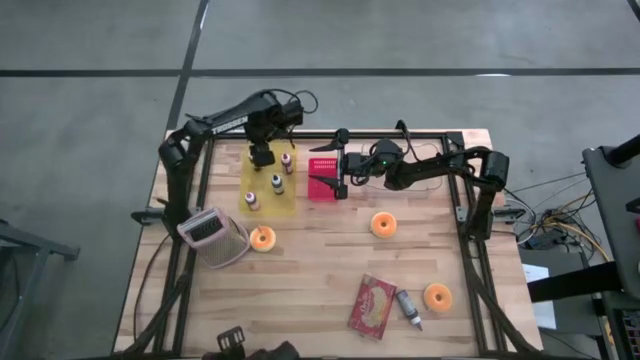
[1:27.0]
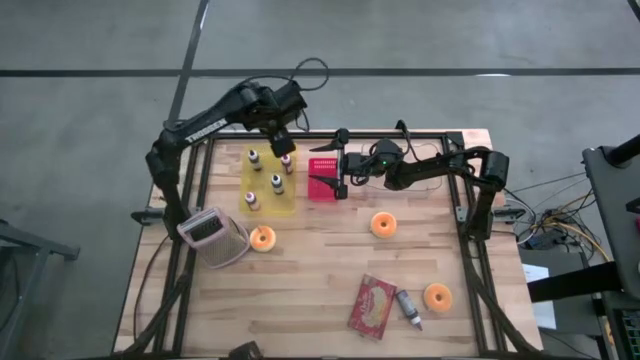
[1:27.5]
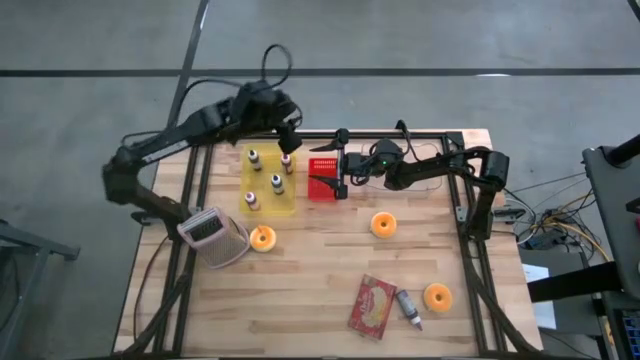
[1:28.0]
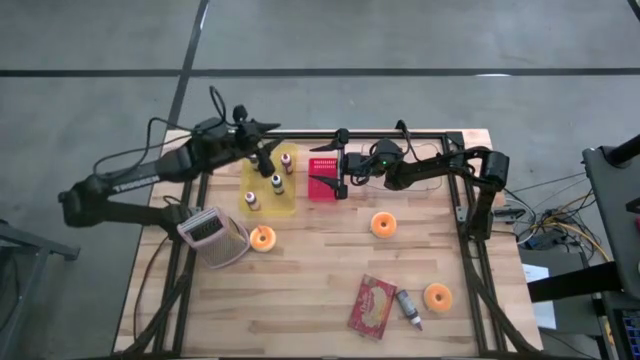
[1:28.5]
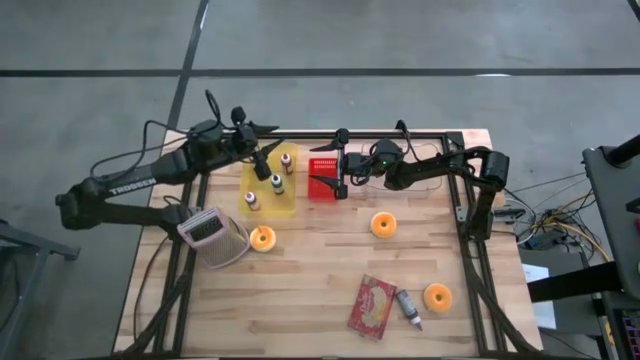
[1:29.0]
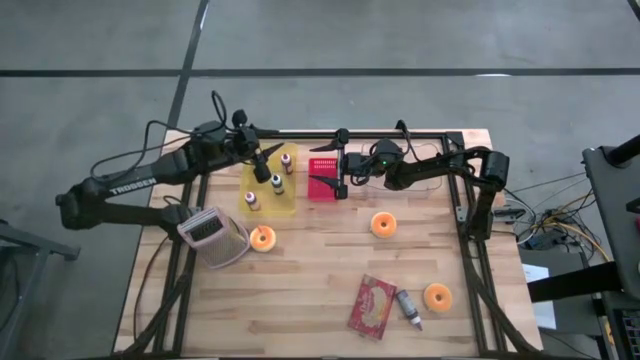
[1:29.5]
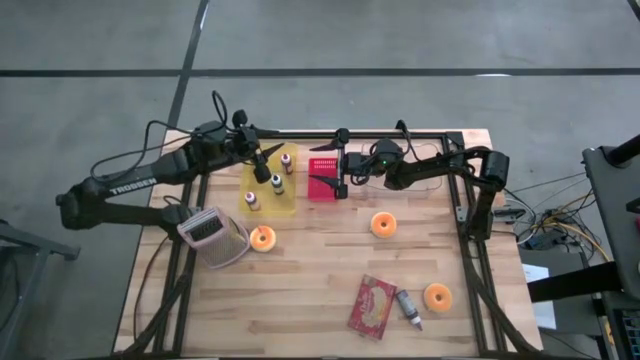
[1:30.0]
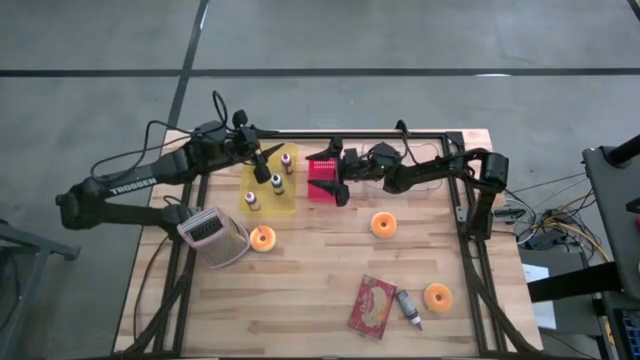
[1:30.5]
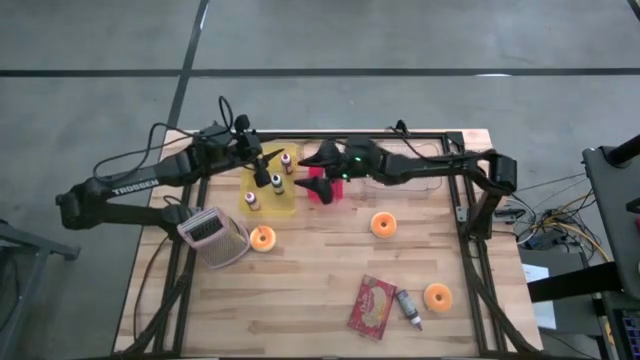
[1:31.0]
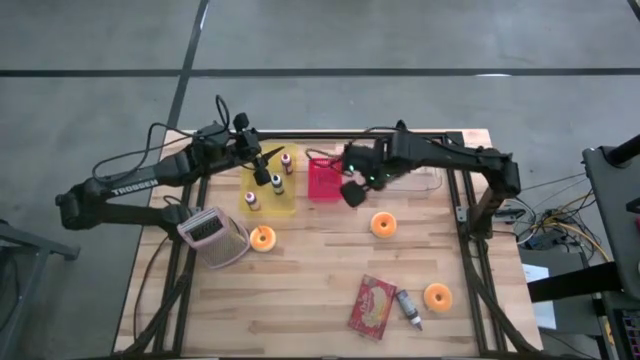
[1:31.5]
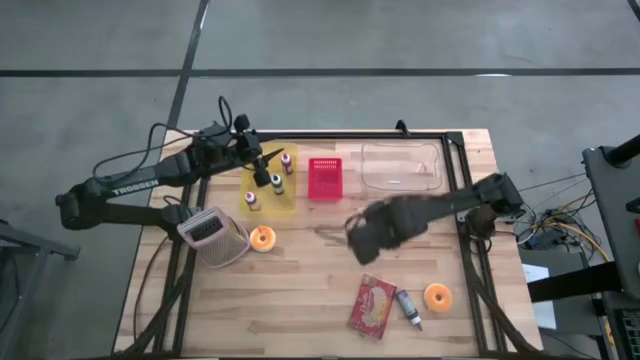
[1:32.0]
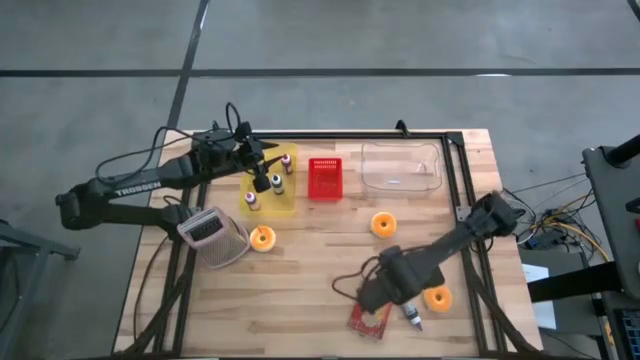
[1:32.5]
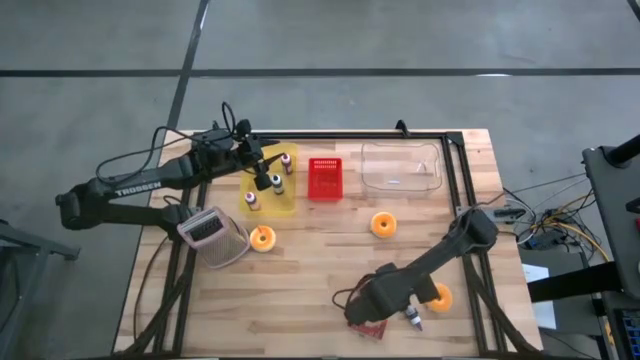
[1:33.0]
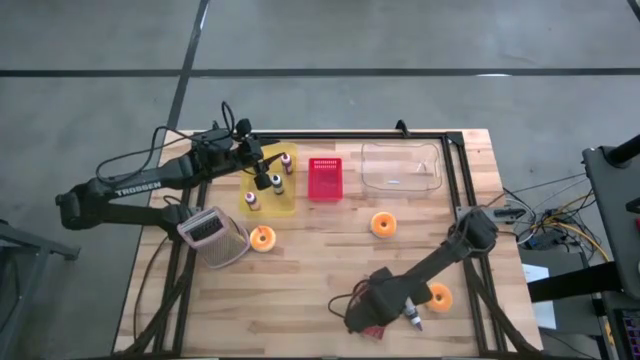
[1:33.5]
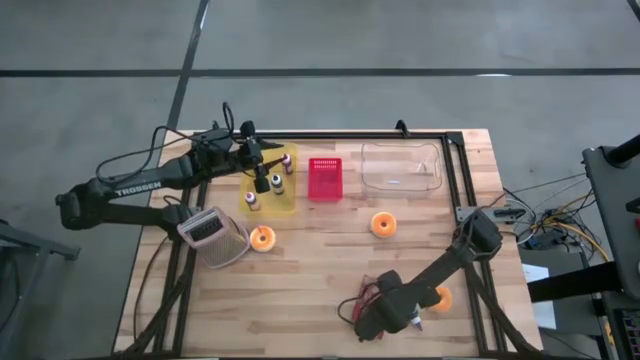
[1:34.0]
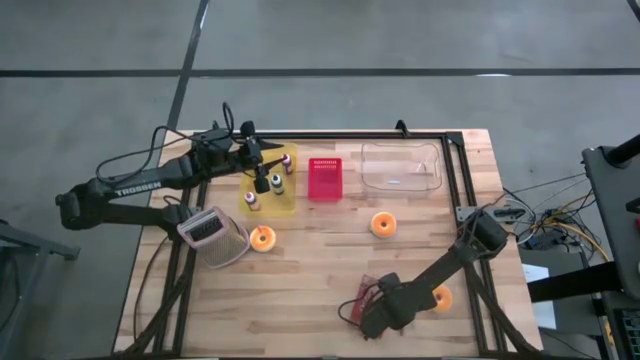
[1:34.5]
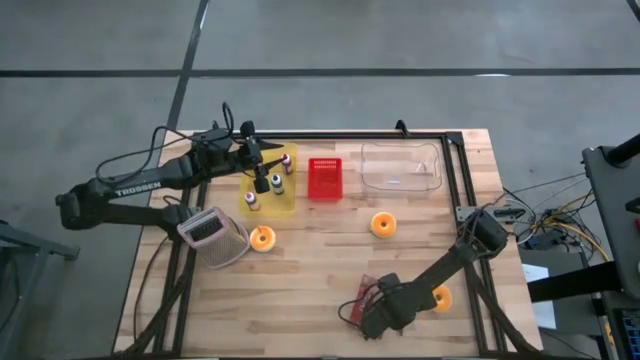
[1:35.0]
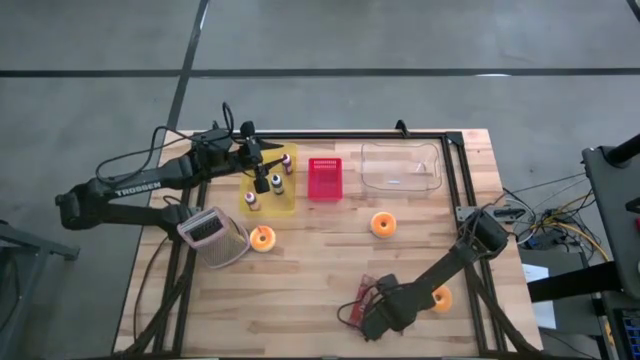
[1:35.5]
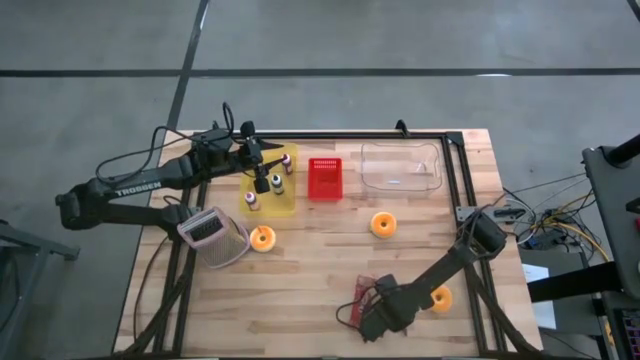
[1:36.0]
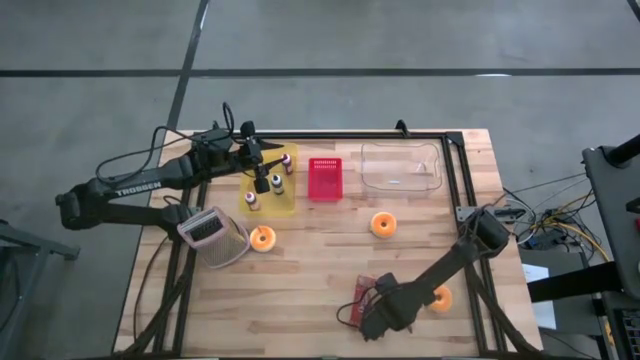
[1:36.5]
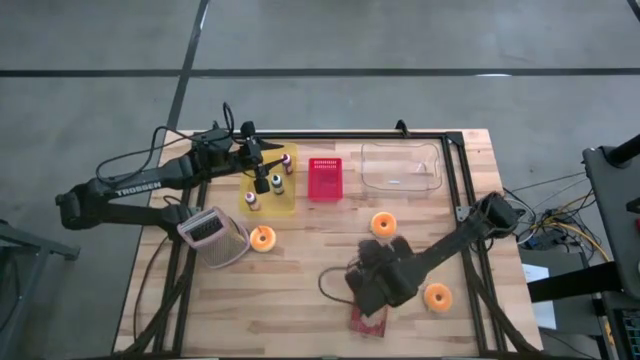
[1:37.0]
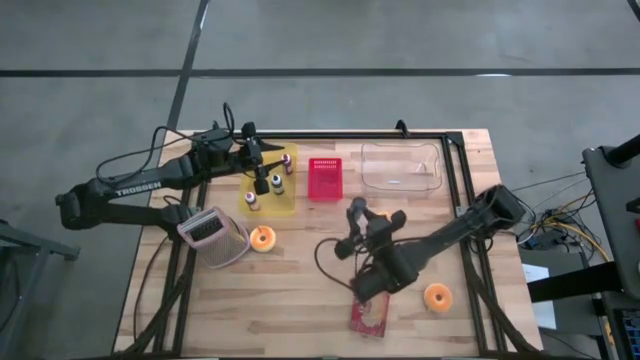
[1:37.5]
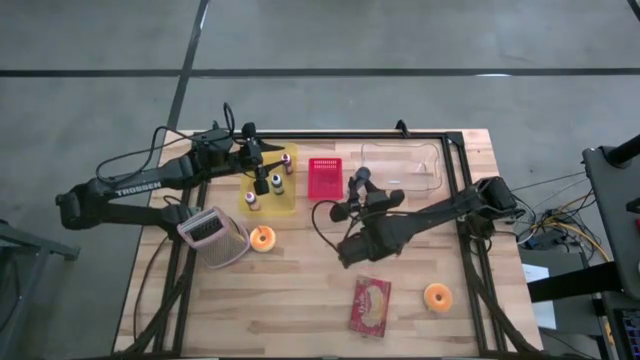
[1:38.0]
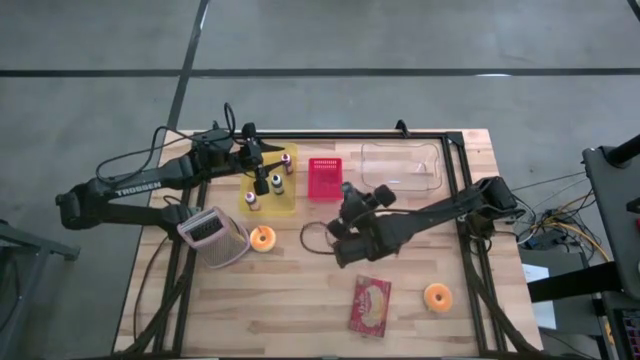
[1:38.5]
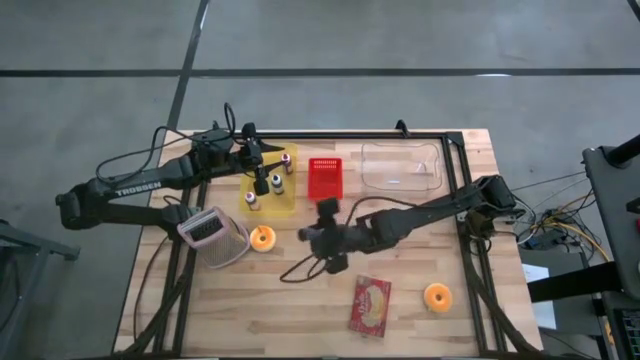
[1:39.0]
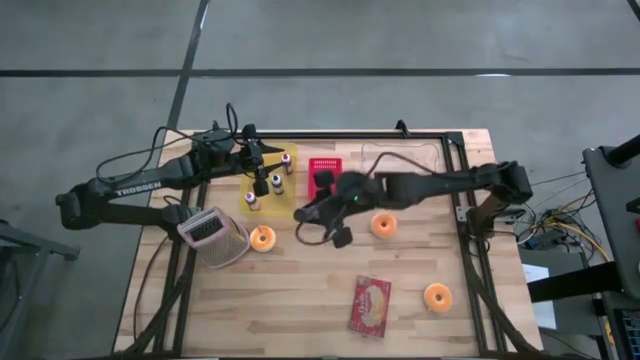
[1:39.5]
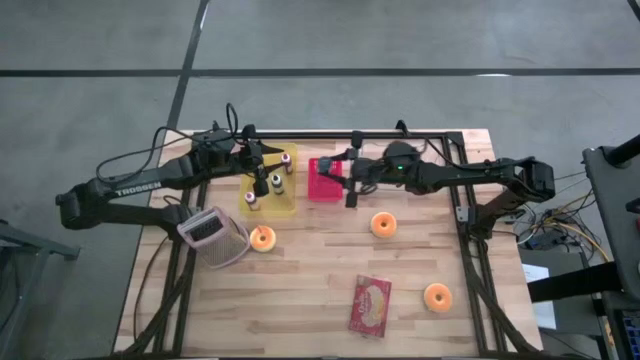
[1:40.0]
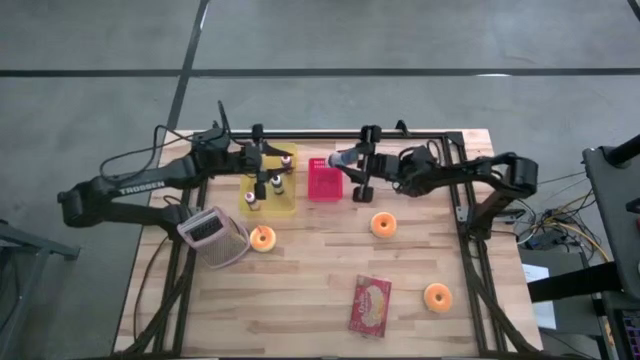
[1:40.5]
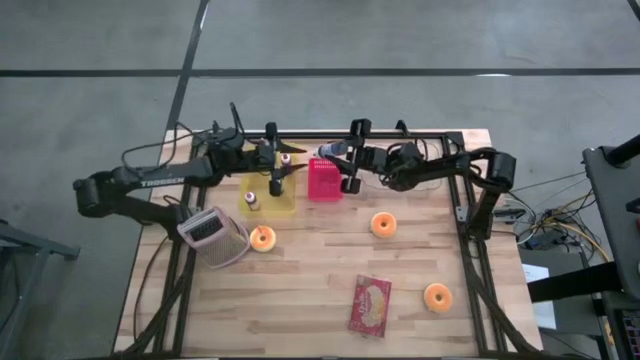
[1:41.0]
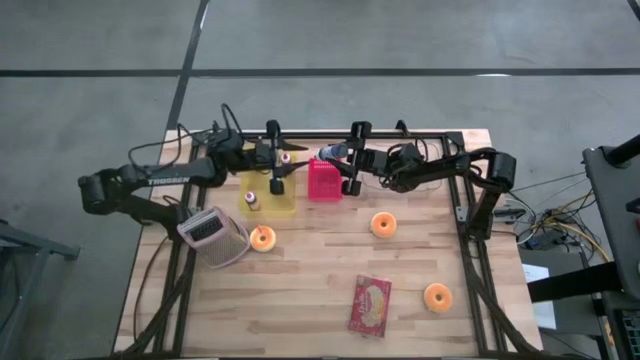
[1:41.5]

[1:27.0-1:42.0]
Task: Pick & Place Food Item
Put the purple food coloring bottle into the yellow bin

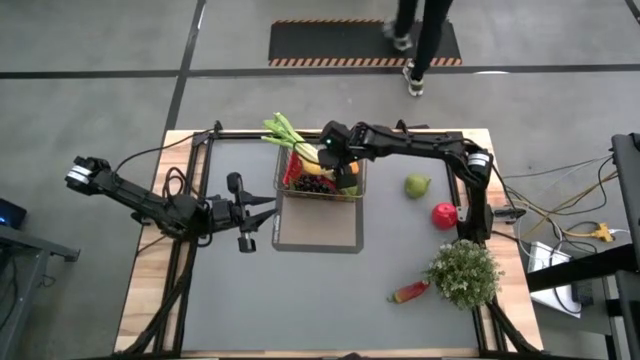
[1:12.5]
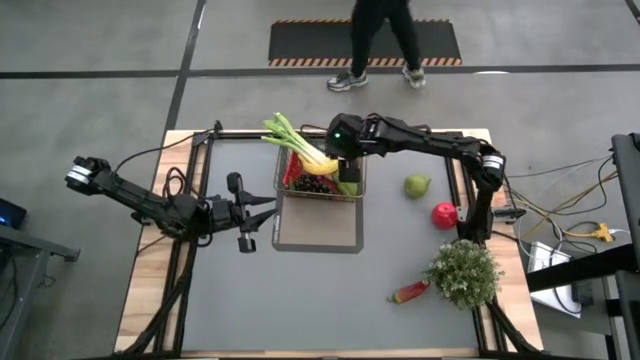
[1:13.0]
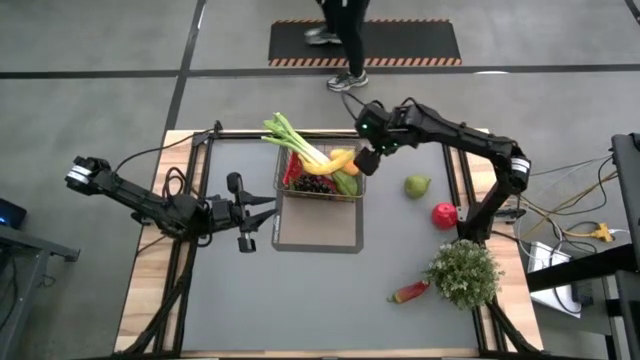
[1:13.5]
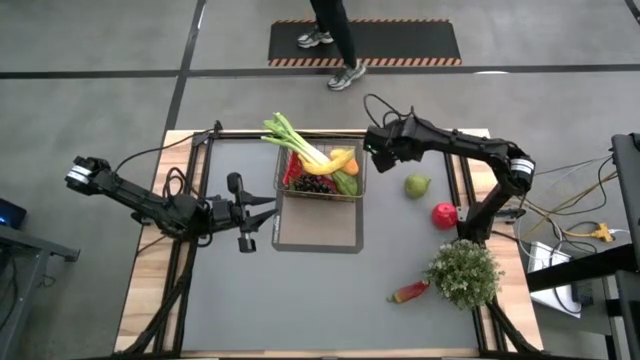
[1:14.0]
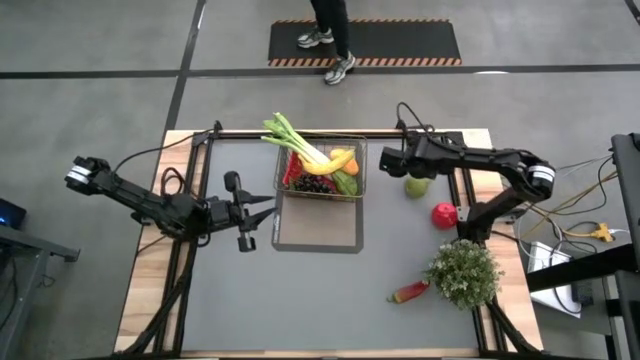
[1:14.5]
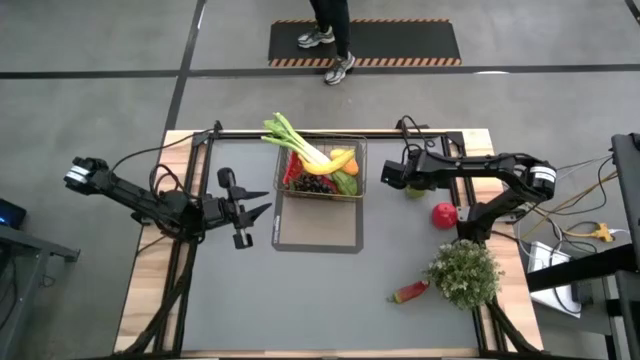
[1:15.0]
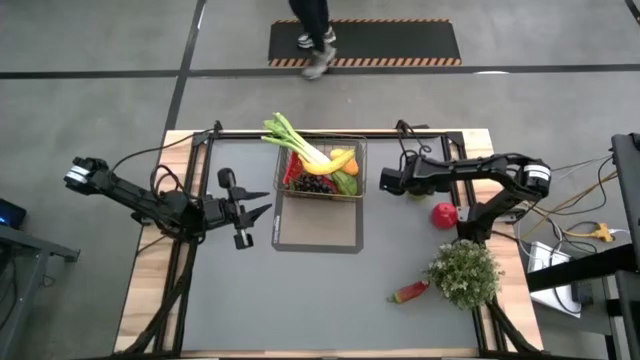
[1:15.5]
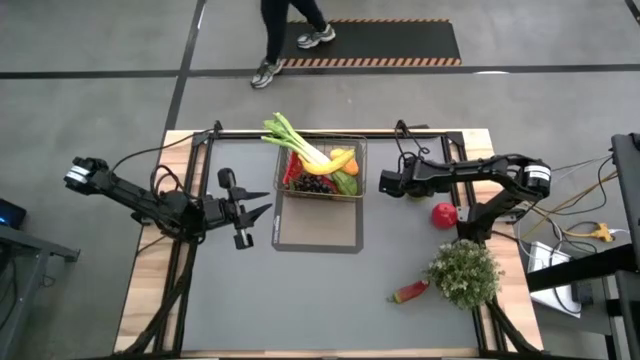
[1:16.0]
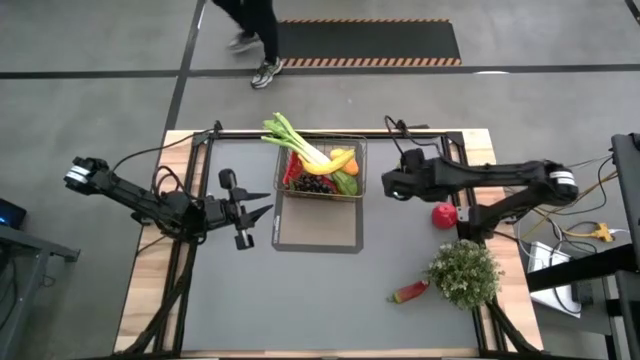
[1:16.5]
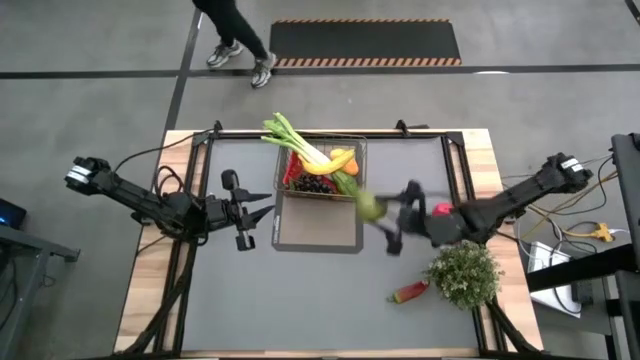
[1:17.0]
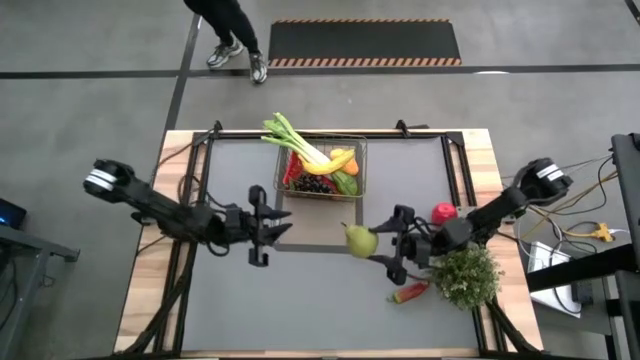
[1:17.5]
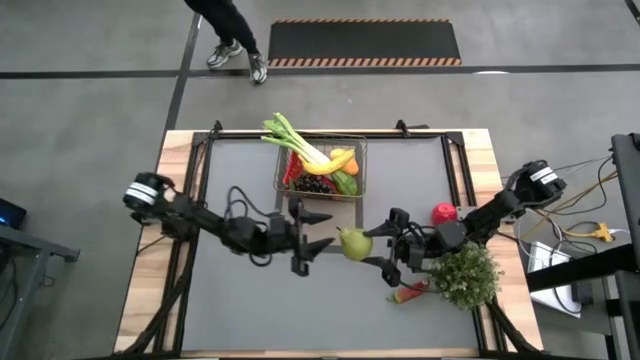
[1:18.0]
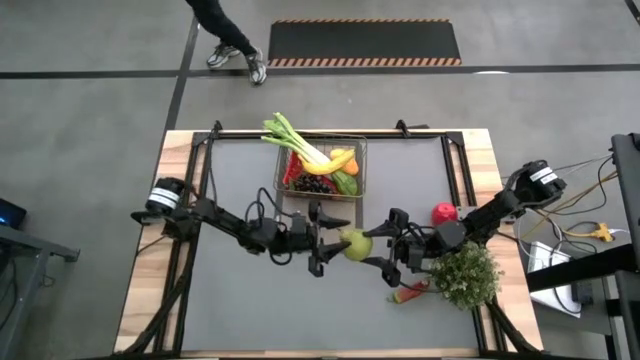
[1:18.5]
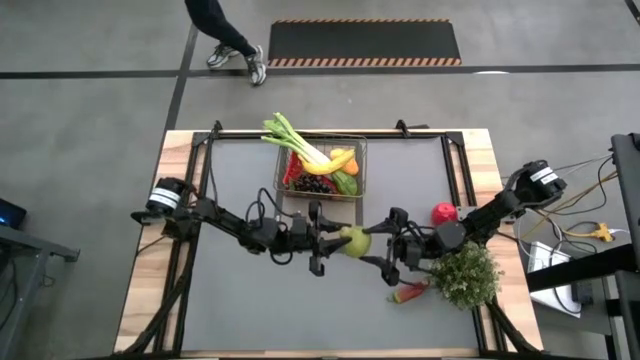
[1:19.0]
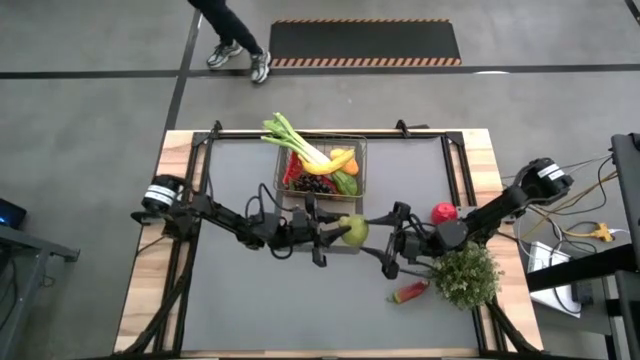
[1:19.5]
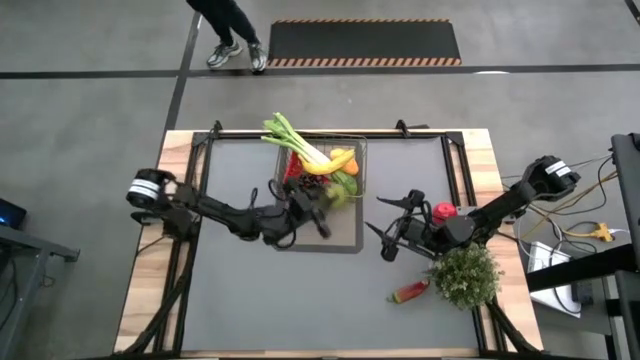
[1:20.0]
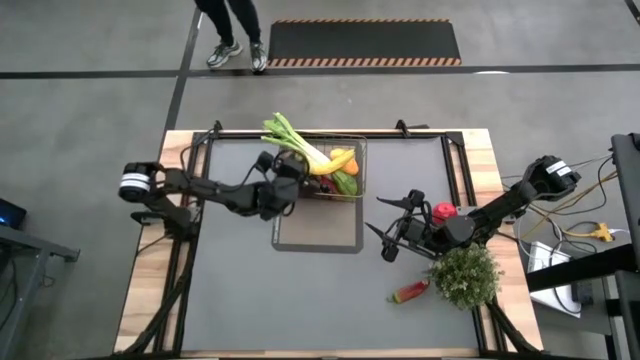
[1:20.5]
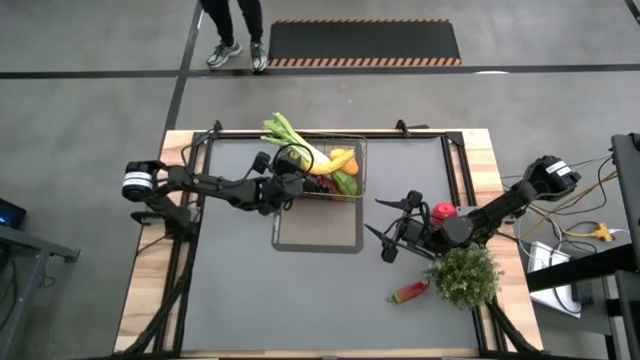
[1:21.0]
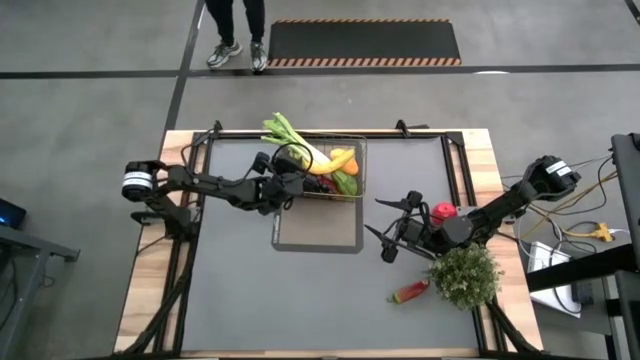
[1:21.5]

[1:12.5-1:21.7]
Task: Build produce basket
Put the pear into the wire basket
